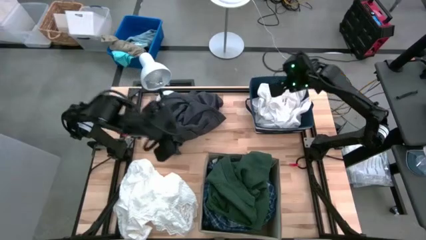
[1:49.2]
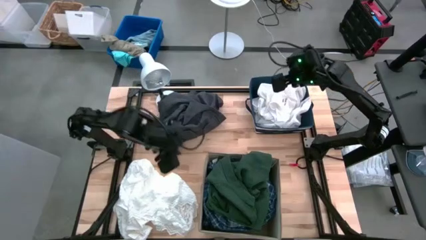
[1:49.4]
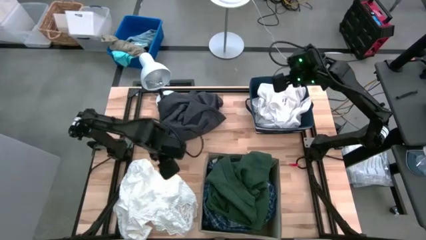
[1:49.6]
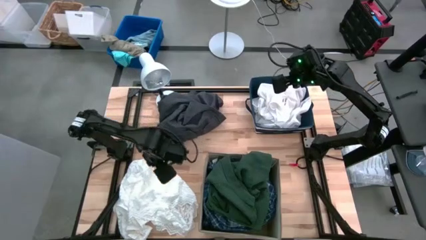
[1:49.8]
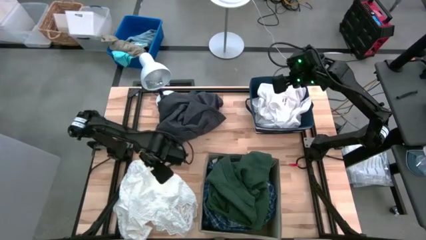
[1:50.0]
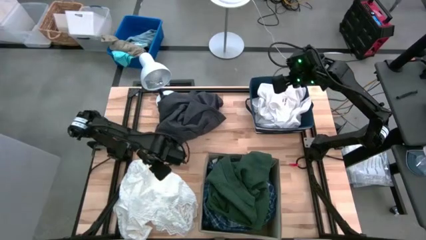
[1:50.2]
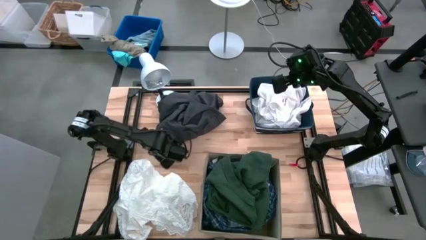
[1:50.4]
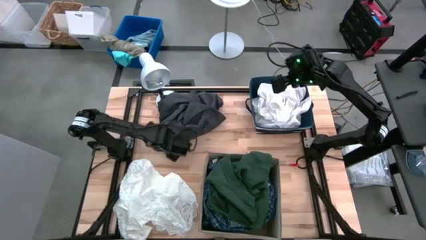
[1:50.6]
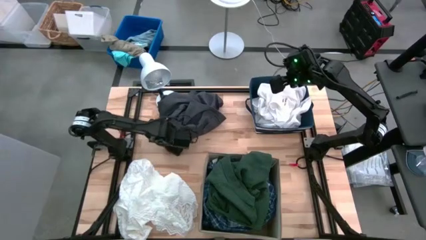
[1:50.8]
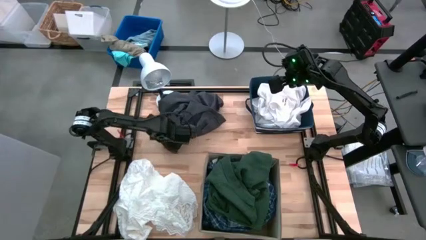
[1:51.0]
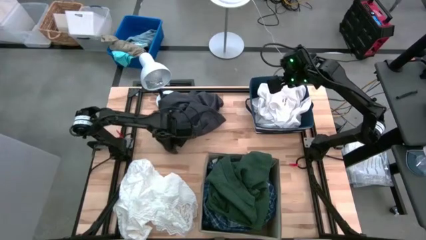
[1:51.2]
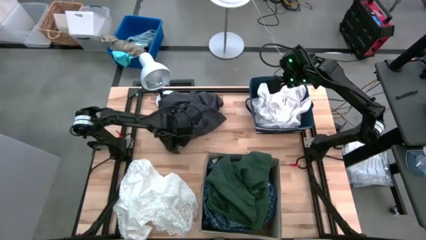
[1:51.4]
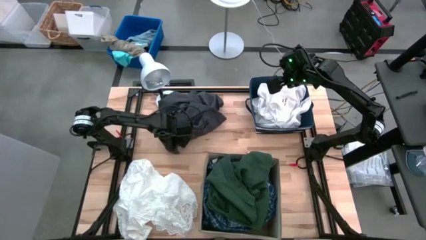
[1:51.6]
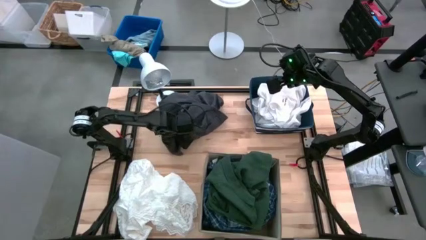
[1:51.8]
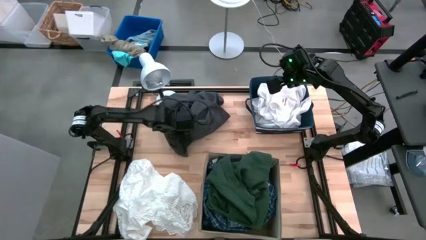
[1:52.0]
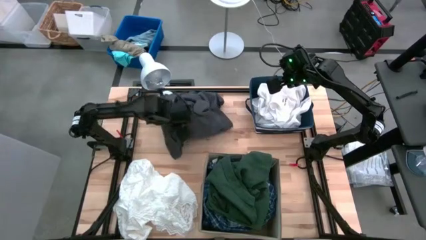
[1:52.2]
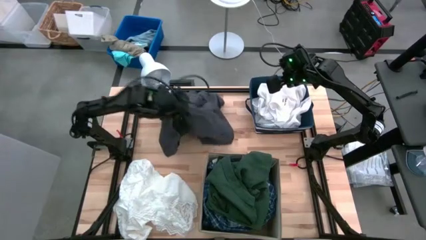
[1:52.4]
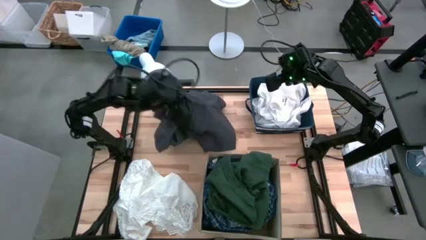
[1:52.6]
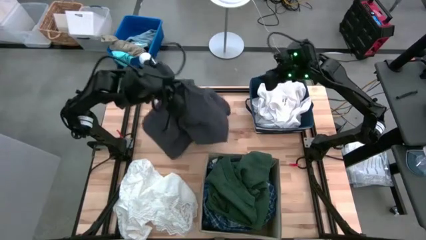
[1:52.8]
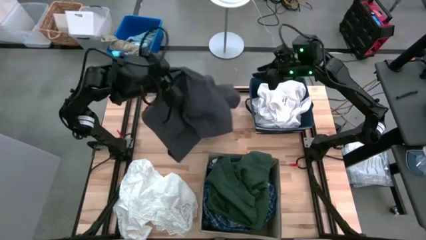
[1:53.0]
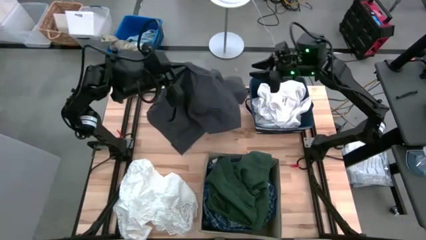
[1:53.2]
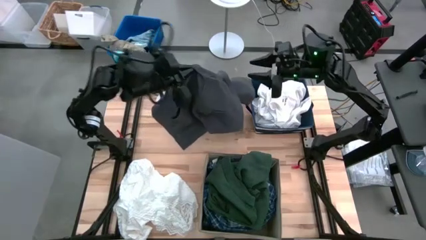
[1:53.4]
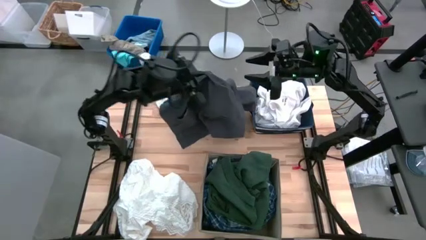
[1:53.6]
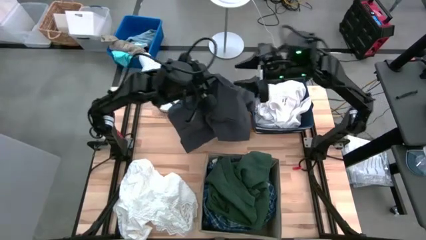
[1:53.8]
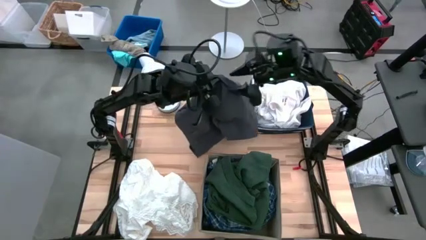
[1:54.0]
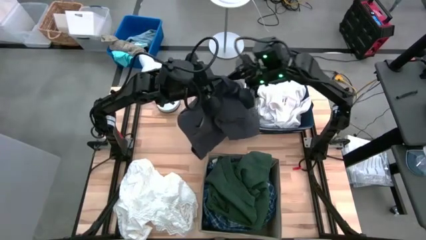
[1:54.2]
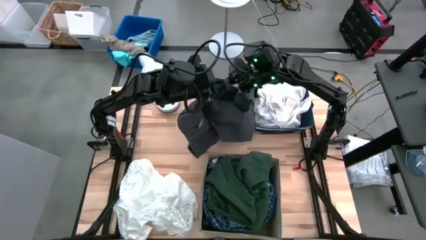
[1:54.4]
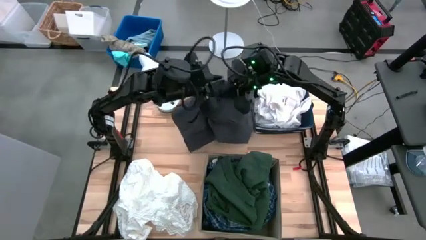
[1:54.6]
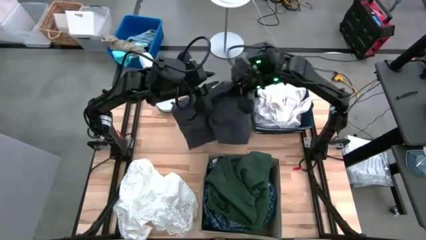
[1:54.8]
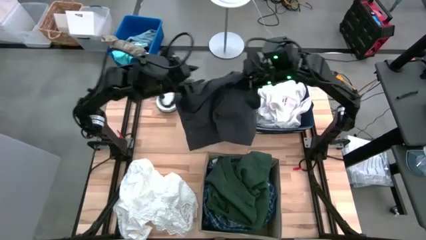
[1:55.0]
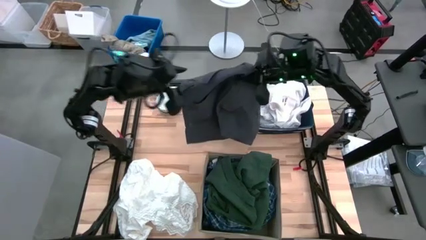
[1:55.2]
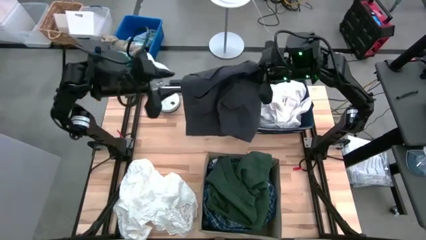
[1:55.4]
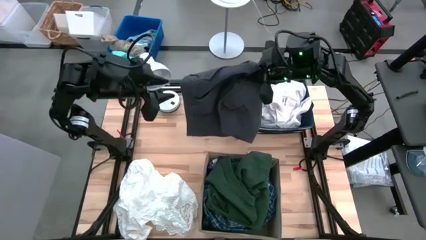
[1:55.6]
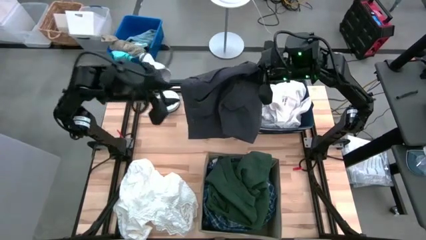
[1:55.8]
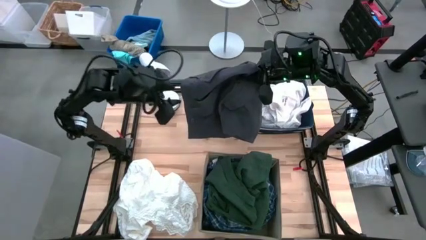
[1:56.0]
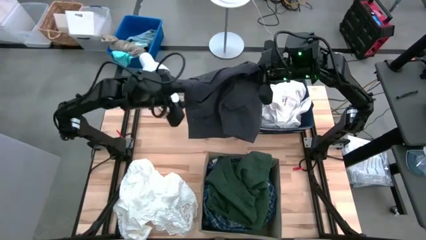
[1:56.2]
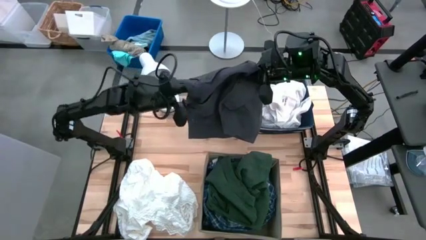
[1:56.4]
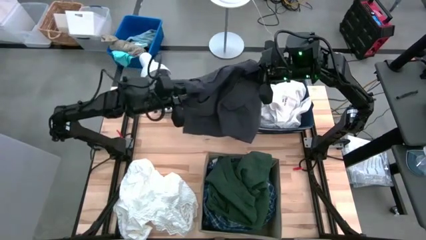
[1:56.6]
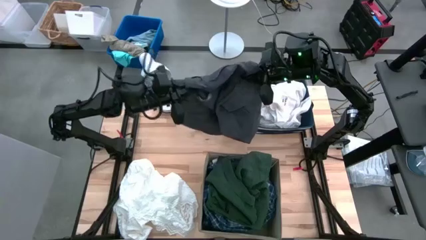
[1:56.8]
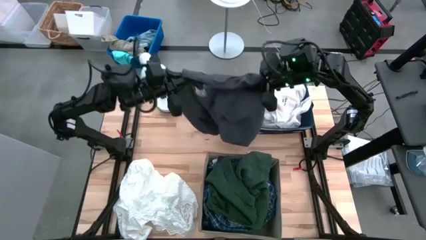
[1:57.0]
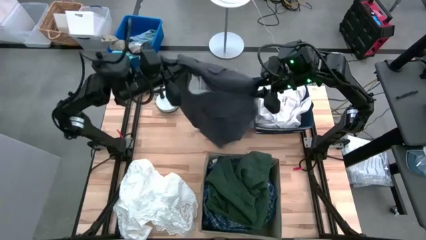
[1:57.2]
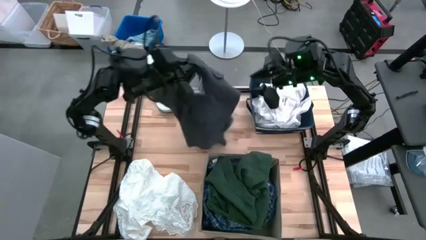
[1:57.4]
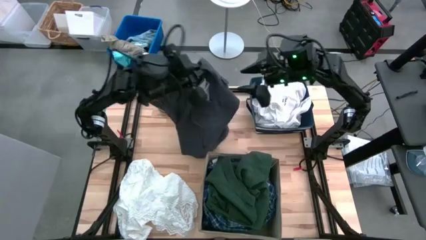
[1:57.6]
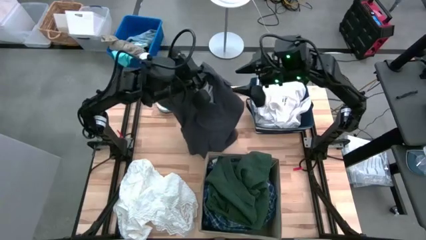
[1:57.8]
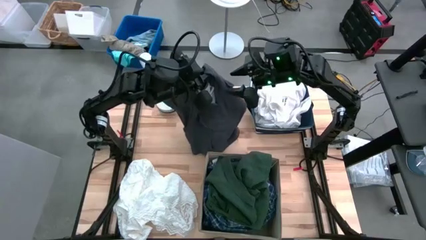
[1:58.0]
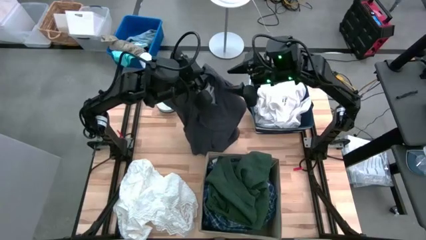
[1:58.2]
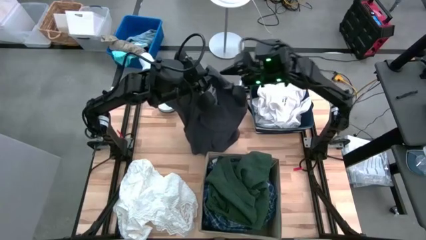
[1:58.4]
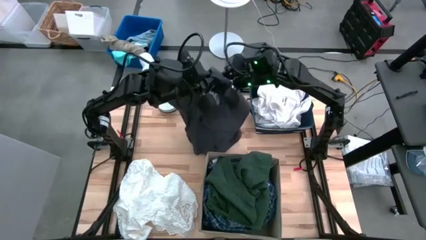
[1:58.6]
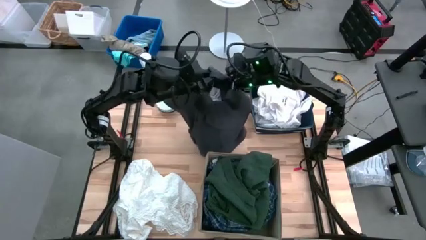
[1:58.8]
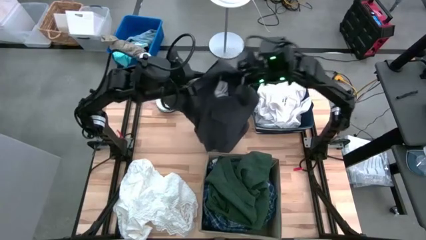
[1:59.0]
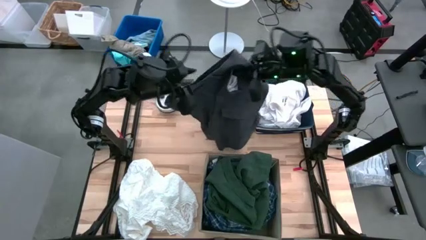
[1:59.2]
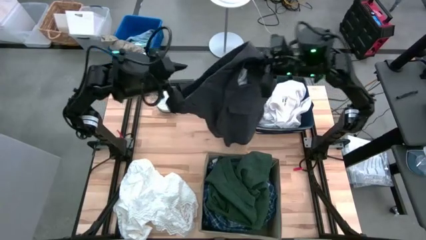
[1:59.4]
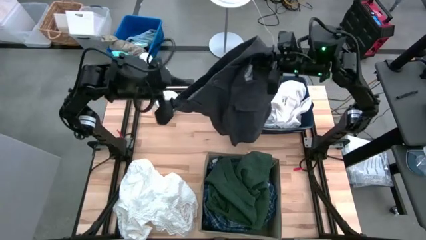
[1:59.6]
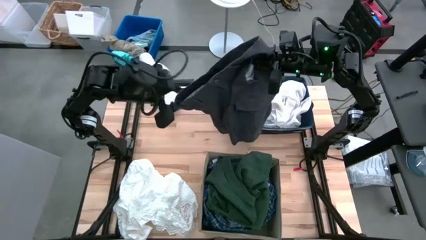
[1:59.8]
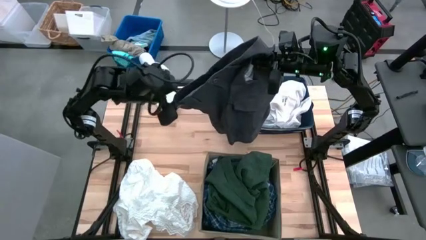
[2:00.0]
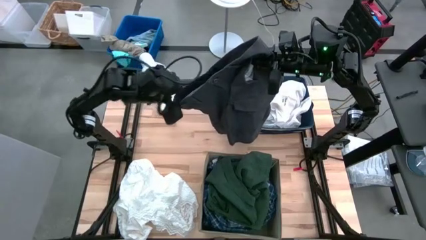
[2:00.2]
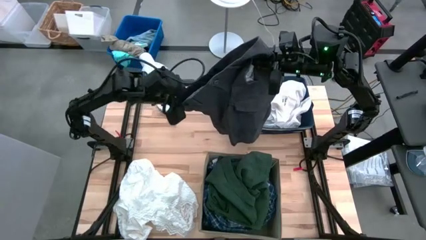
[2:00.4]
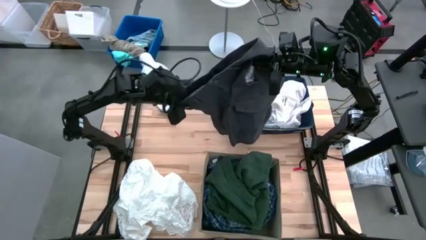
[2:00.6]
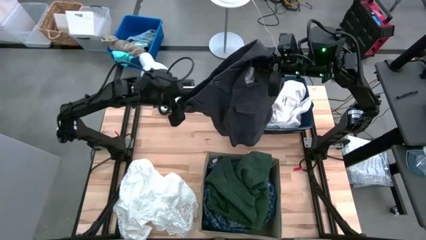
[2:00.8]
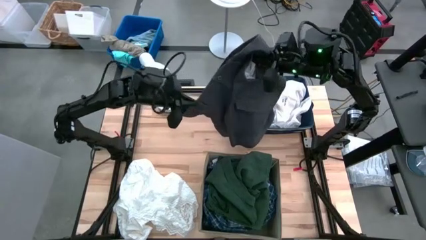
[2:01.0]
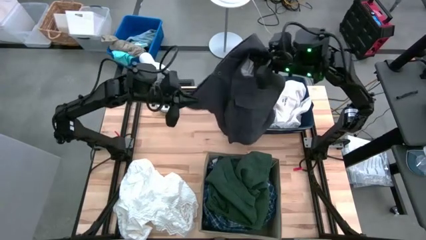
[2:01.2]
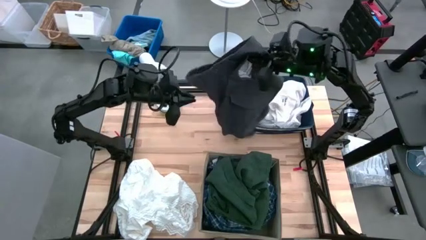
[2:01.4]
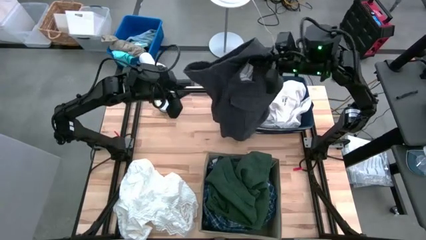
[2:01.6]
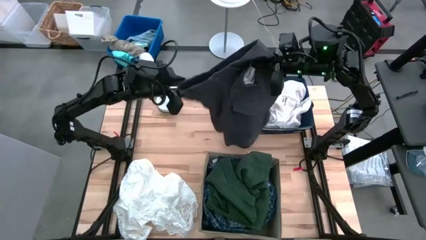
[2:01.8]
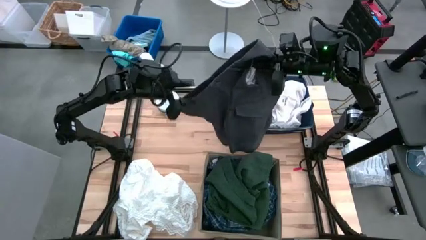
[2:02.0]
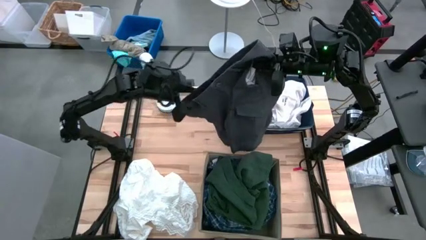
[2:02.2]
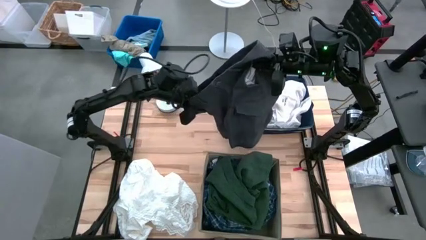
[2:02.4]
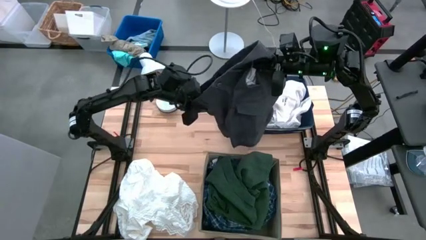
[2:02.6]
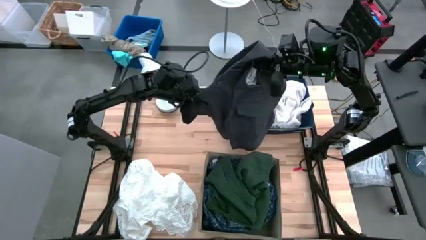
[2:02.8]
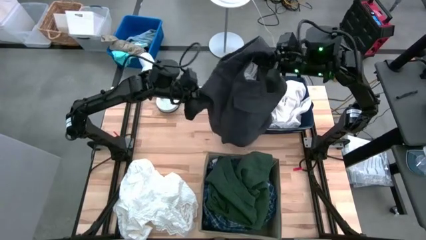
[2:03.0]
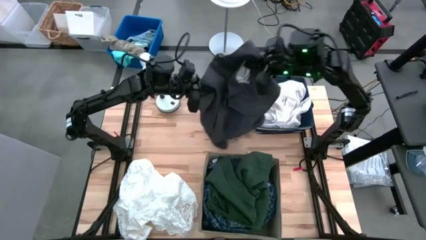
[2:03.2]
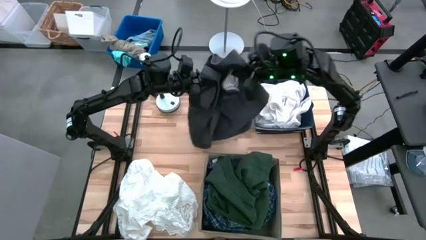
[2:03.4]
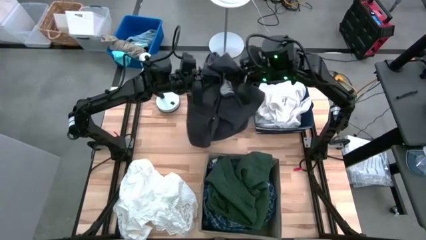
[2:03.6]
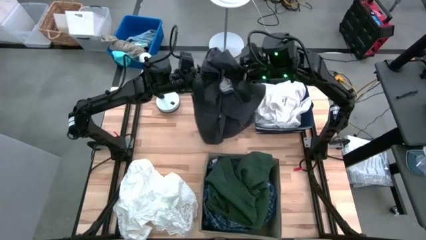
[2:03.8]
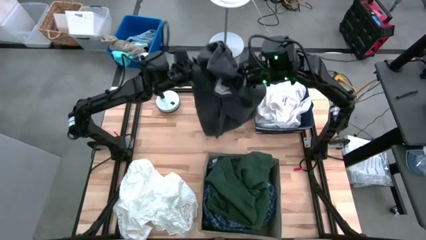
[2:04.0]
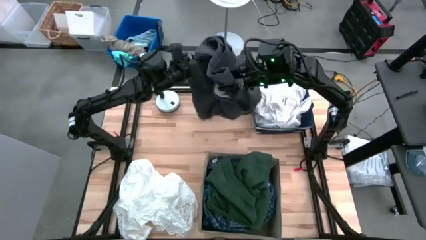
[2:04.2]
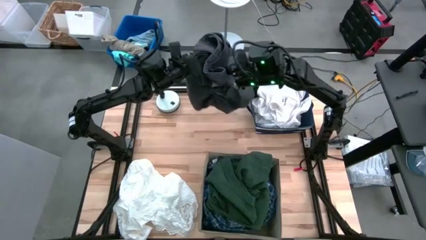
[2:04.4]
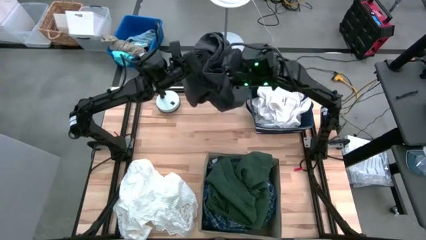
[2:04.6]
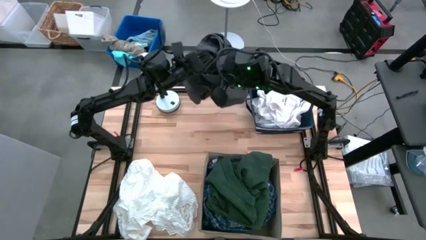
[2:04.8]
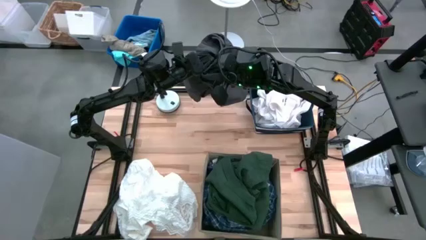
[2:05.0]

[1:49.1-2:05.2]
Task: Sort clothes
Put the gray shorts into the brown laundry organizer
